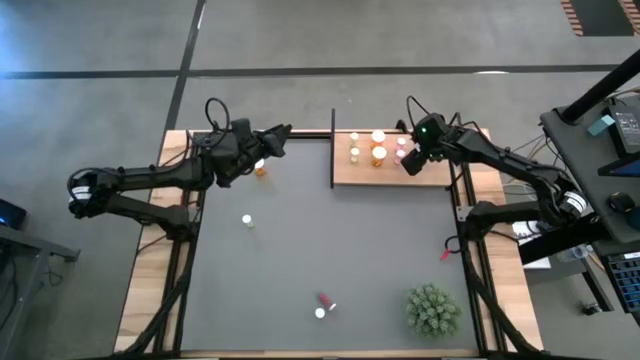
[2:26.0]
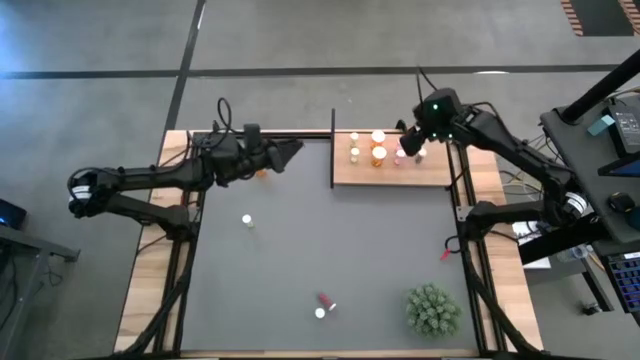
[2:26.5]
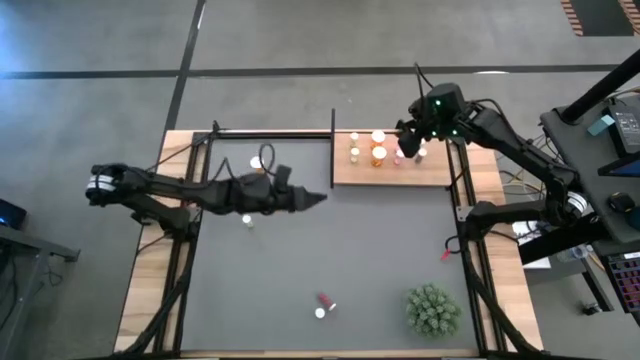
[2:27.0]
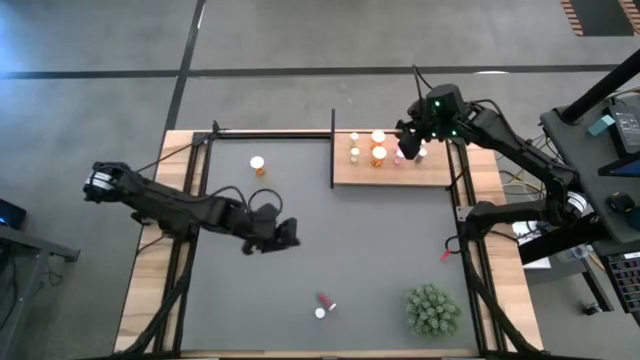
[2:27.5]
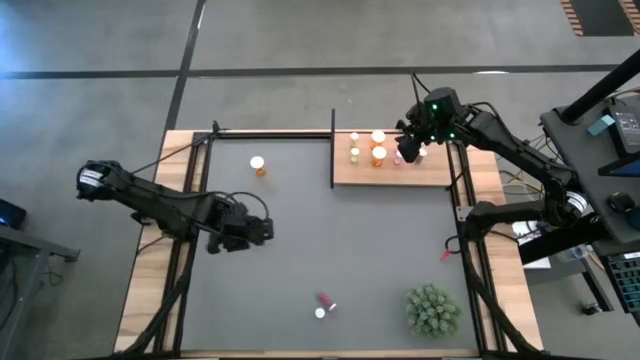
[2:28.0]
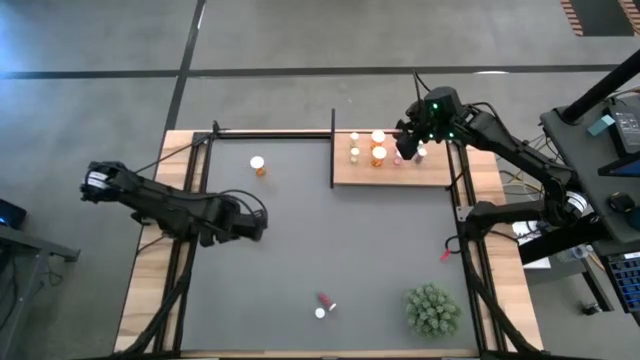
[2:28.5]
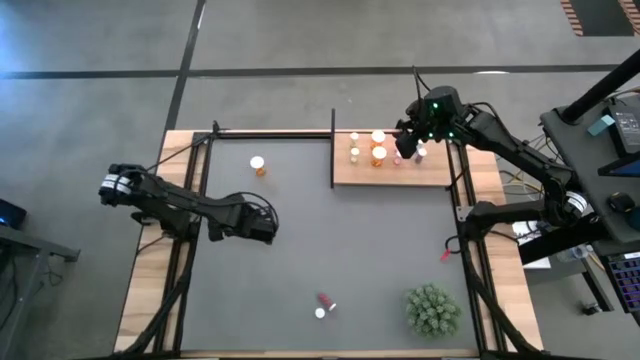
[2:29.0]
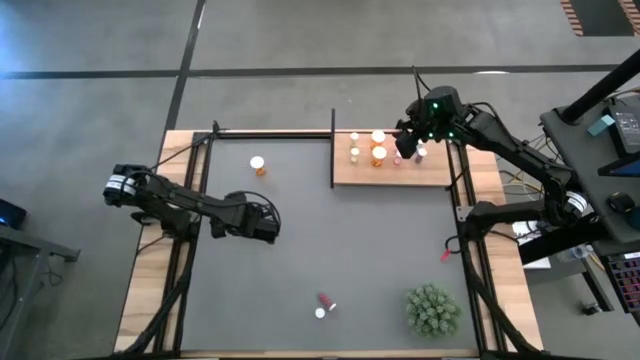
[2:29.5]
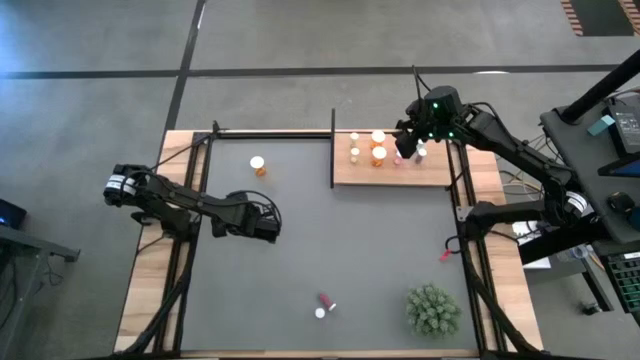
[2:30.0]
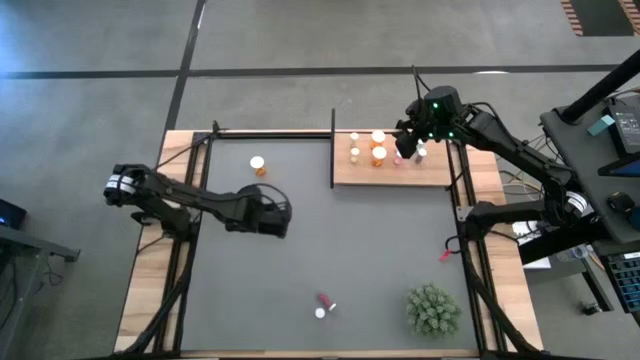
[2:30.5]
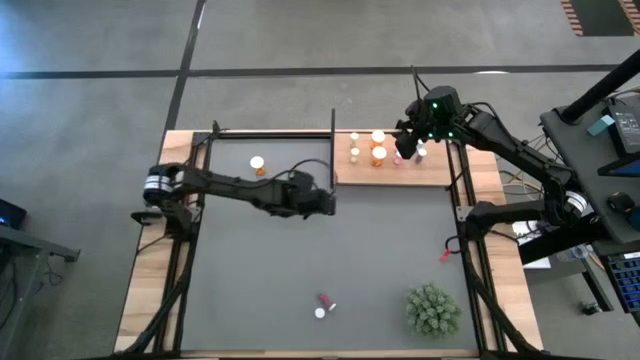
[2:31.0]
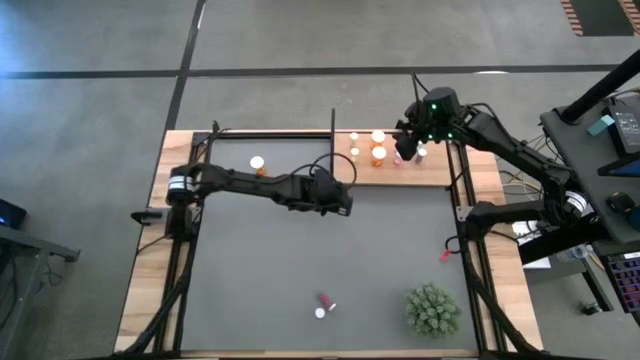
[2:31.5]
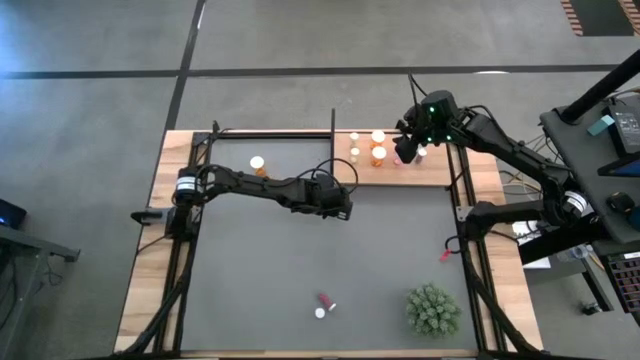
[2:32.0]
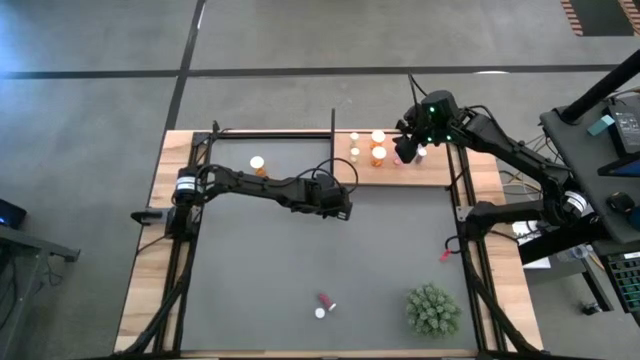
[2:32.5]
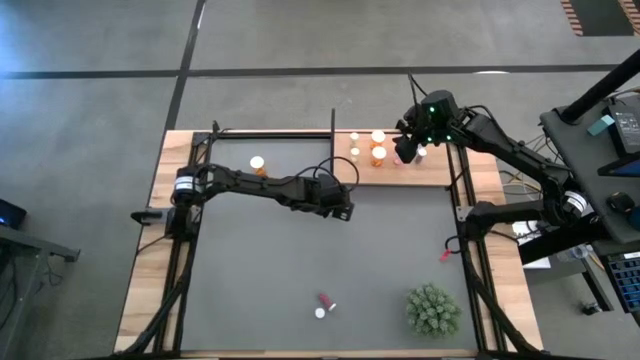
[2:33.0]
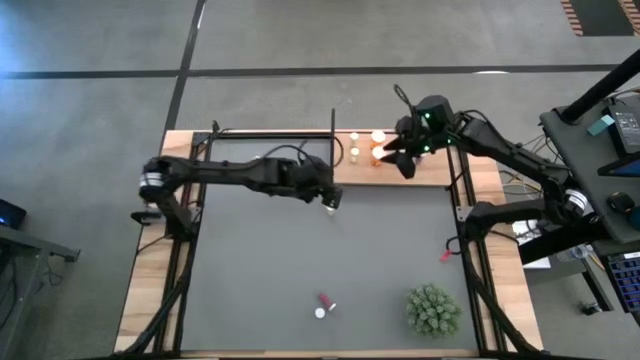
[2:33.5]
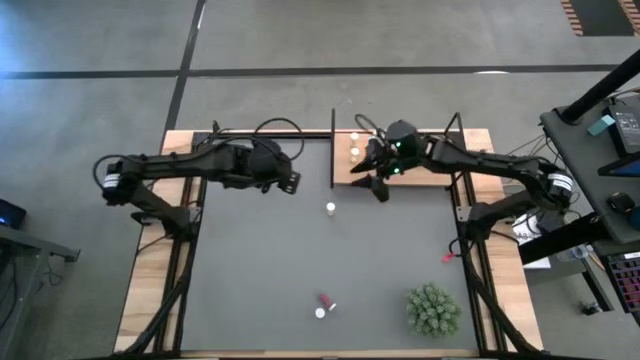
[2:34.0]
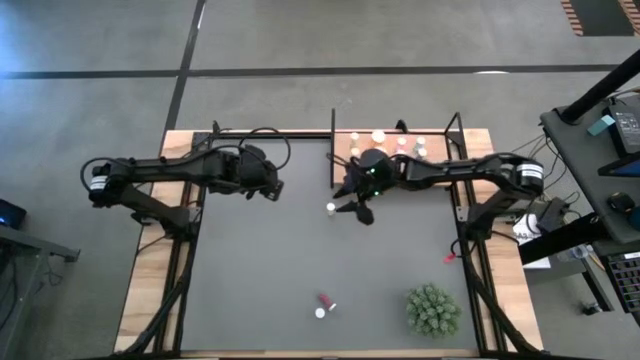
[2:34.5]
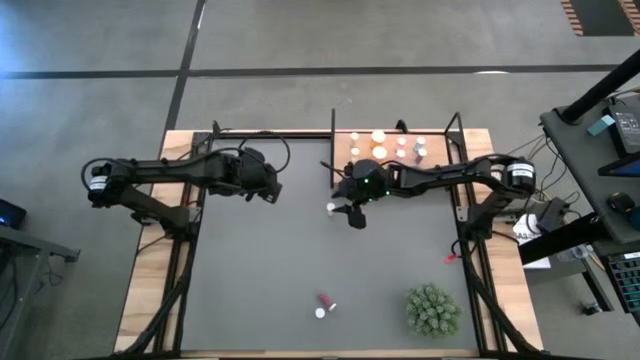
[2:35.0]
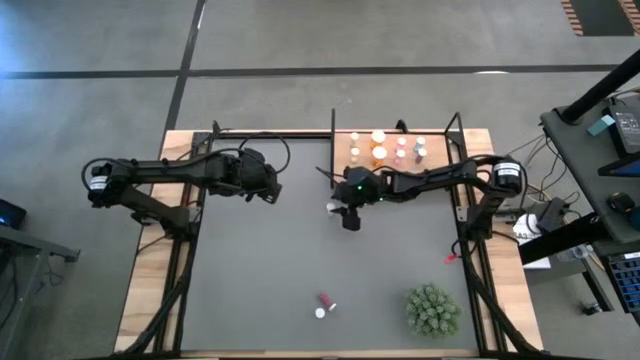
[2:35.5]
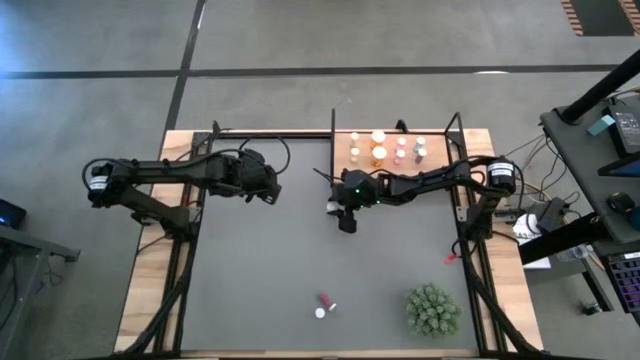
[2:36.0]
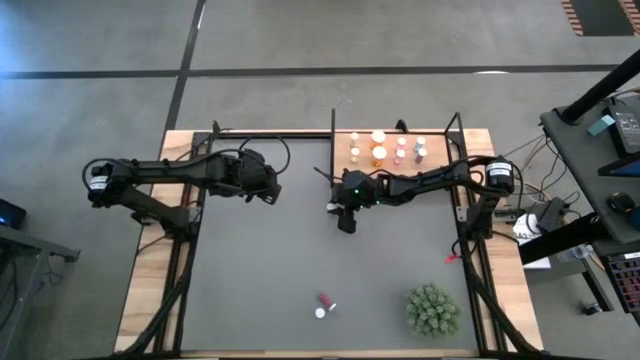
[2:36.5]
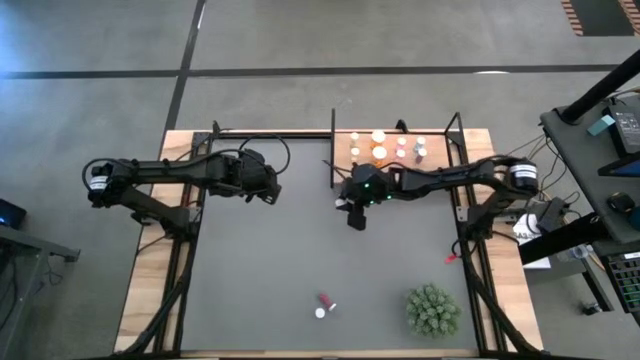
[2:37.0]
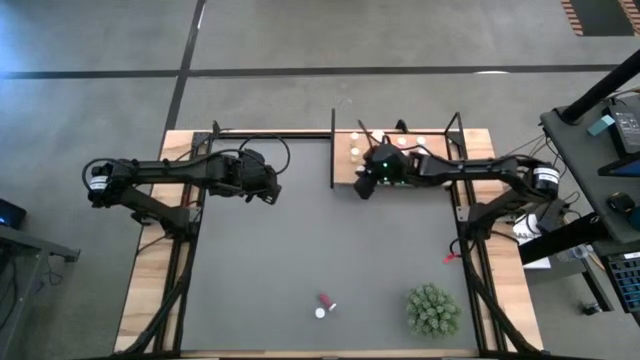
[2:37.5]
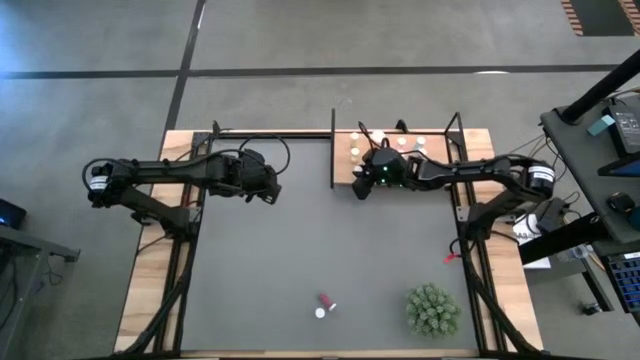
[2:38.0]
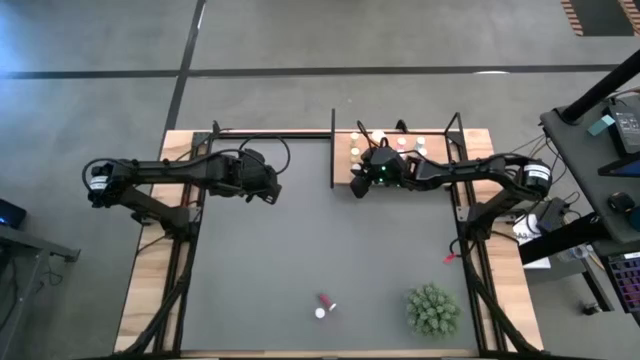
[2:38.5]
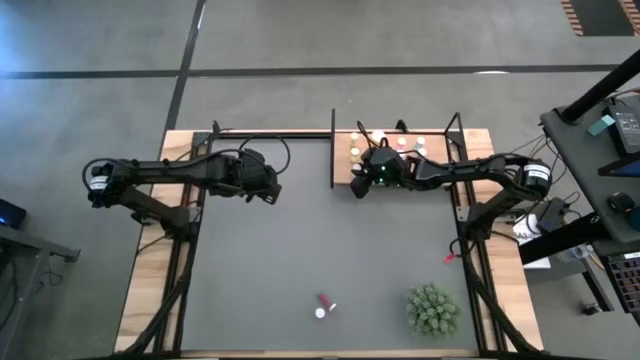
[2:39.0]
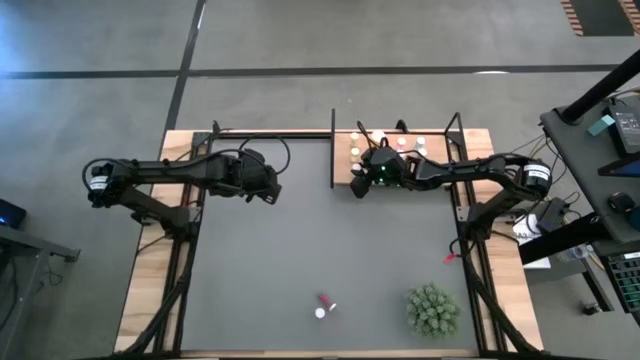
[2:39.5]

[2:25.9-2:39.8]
Task: Pick and place medicine bottles onto shelf by color
Put the yellow medicine bottle on the shelf aligned with the other yellow medicine bottle

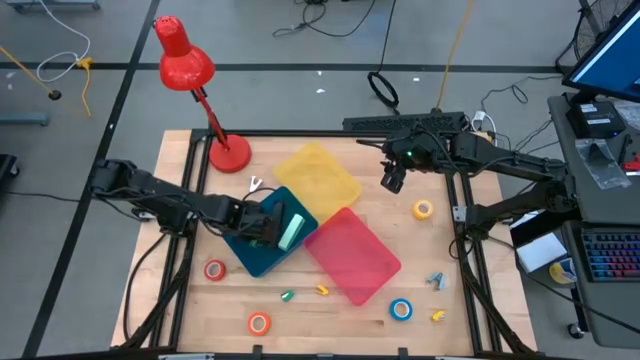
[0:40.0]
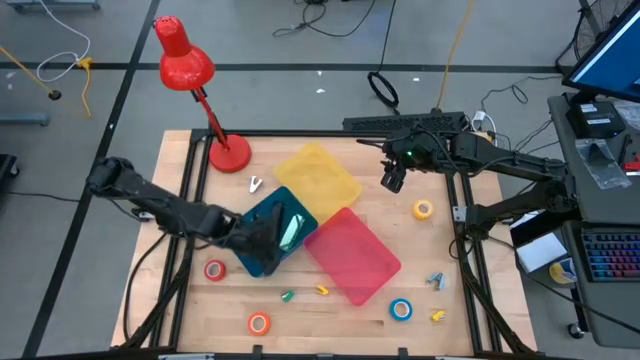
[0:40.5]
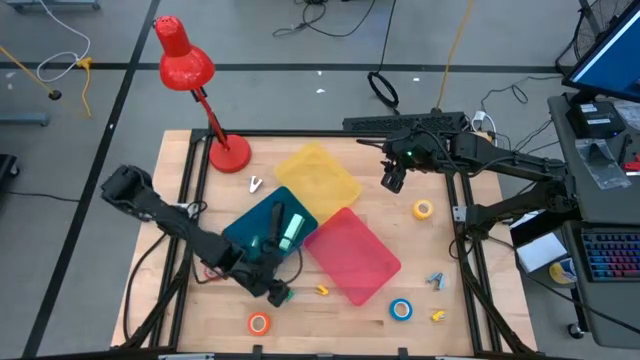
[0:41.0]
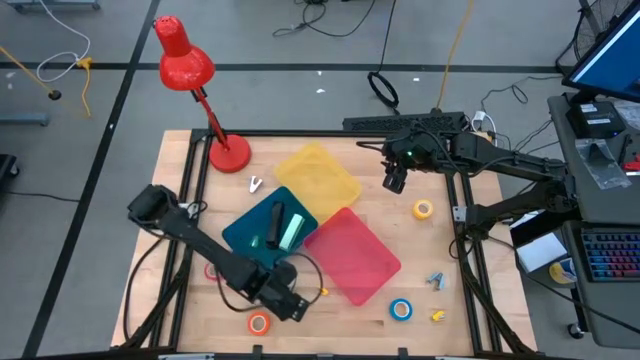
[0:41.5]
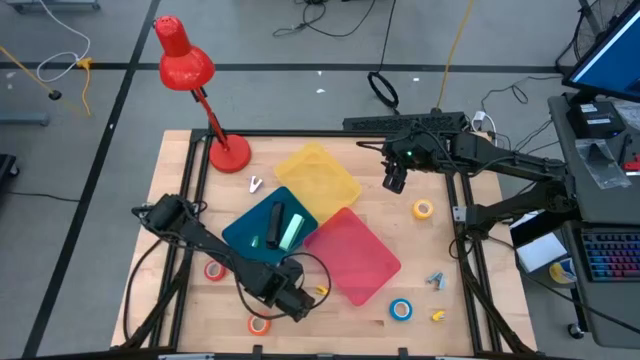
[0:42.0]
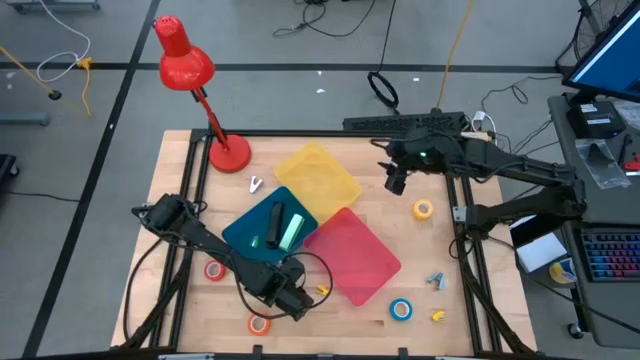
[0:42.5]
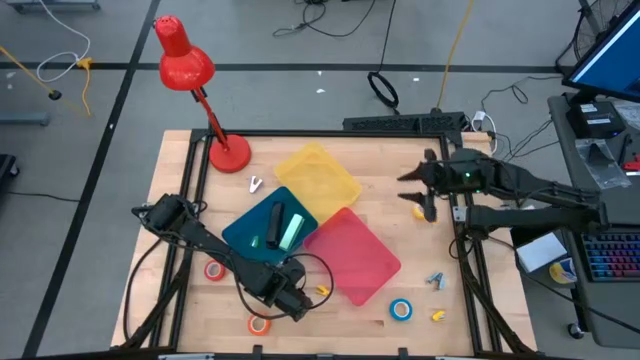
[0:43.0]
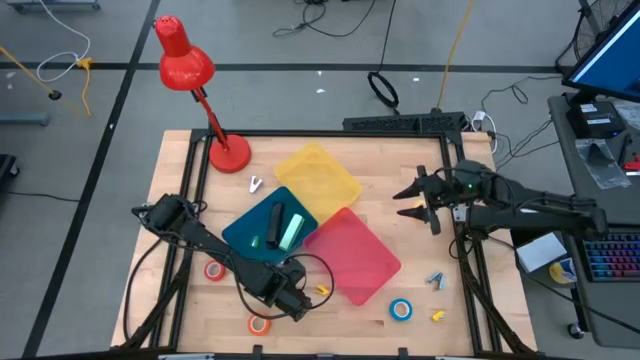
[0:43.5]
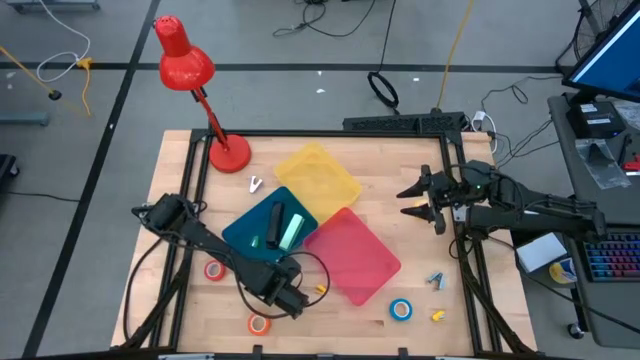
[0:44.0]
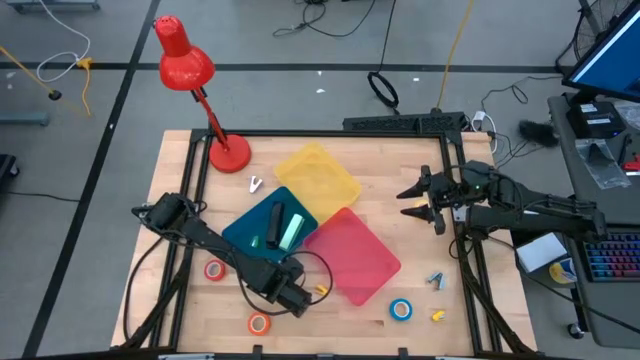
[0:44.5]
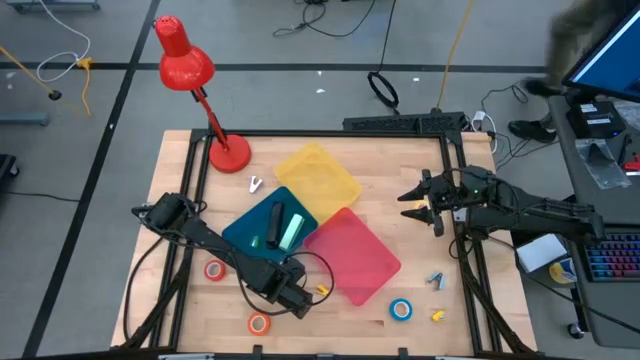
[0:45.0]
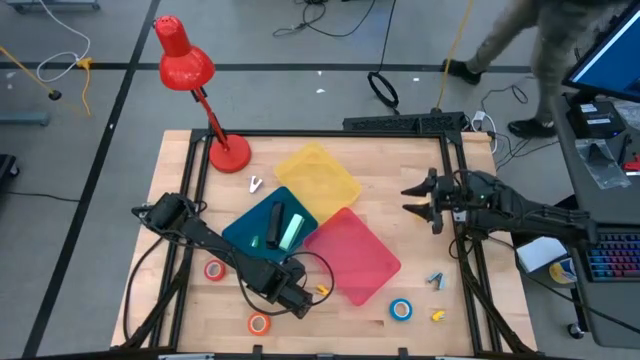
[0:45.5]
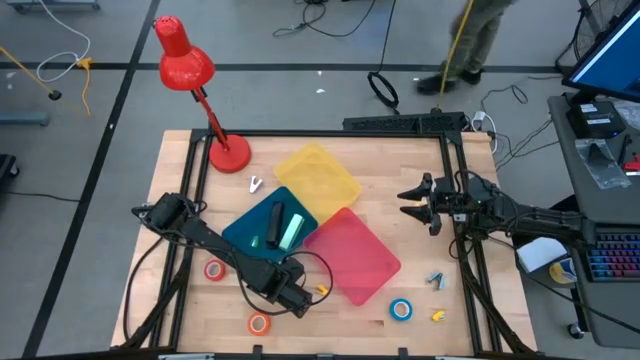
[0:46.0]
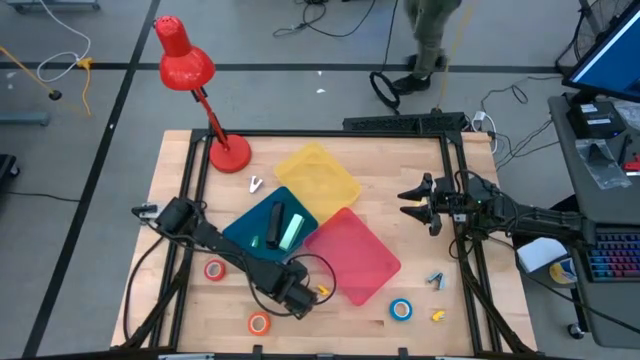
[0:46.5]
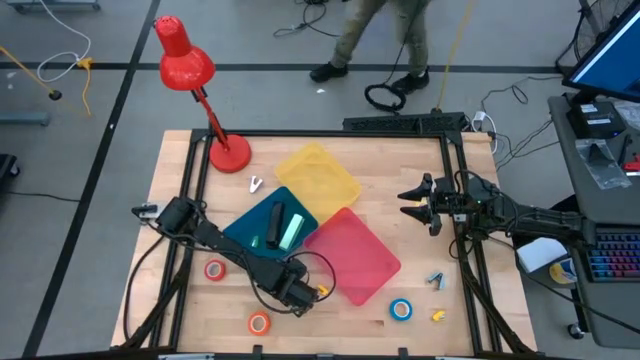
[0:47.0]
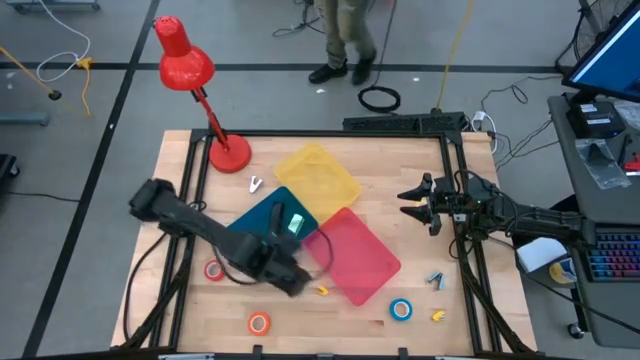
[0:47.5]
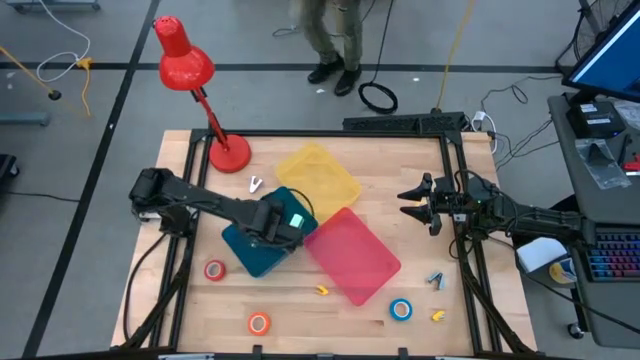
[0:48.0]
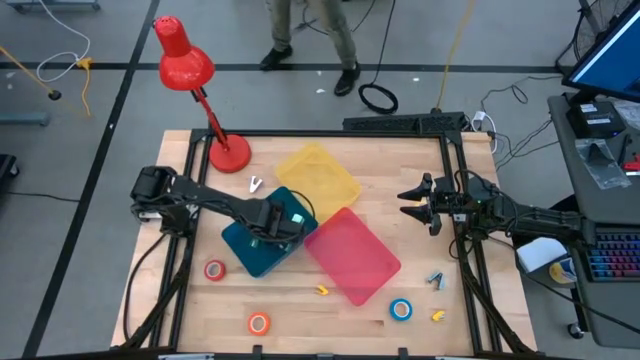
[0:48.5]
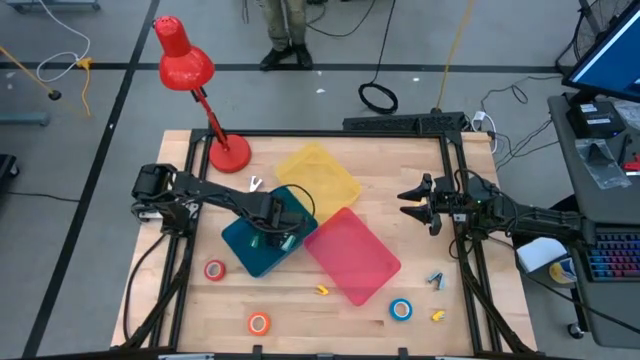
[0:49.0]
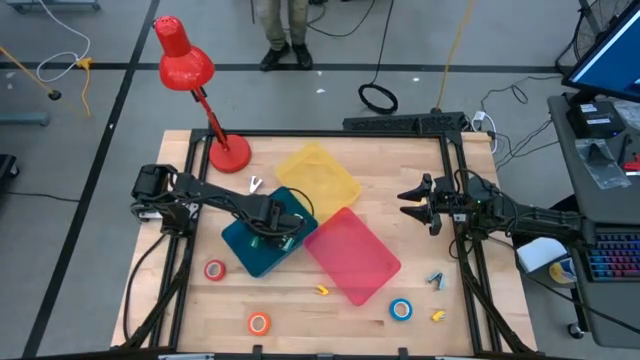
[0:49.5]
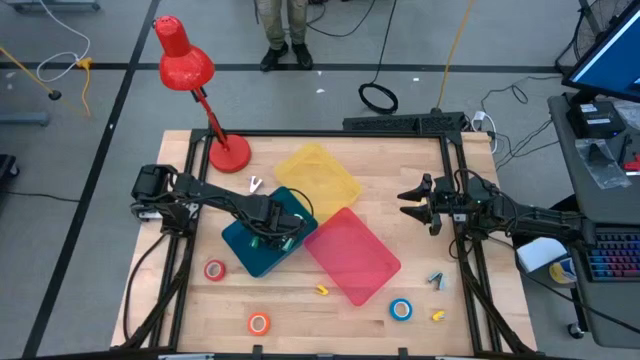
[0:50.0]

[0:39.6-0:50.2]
Task: Pick and place Stapler, Stapler remover, tape
Put the green stapler into the blue bin
